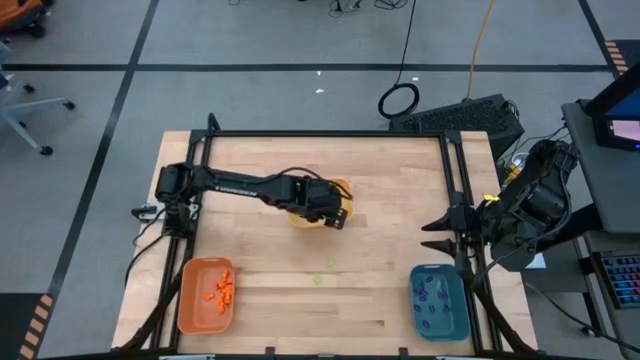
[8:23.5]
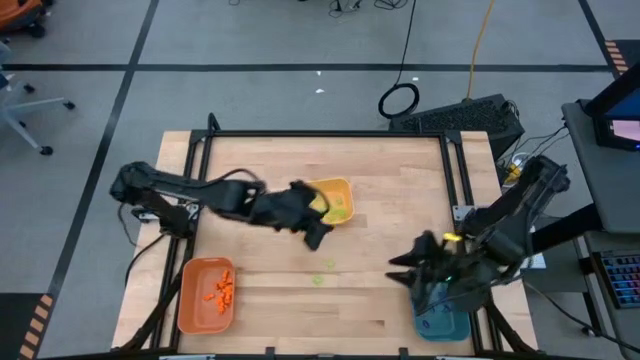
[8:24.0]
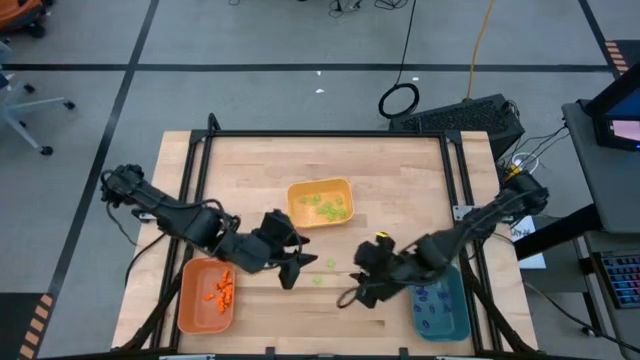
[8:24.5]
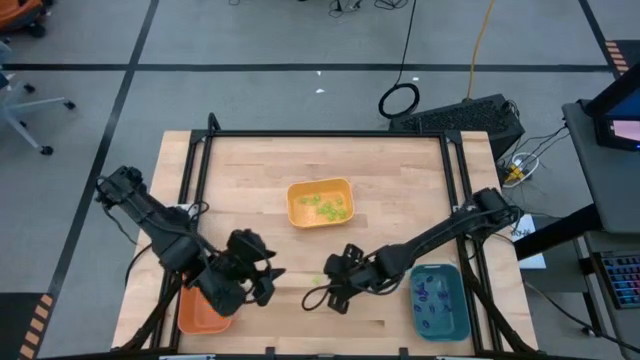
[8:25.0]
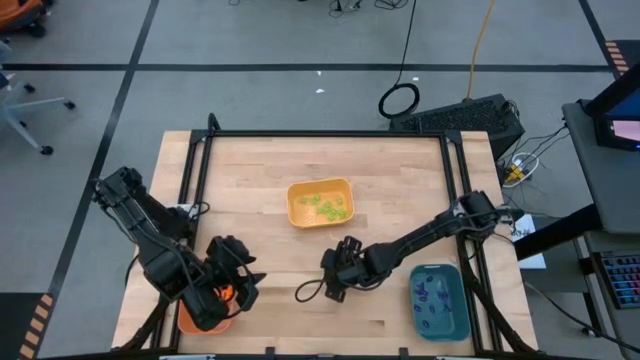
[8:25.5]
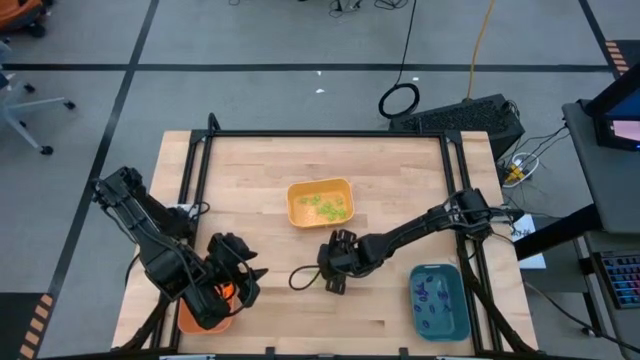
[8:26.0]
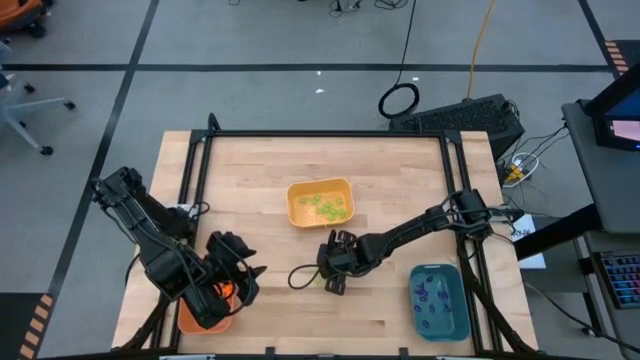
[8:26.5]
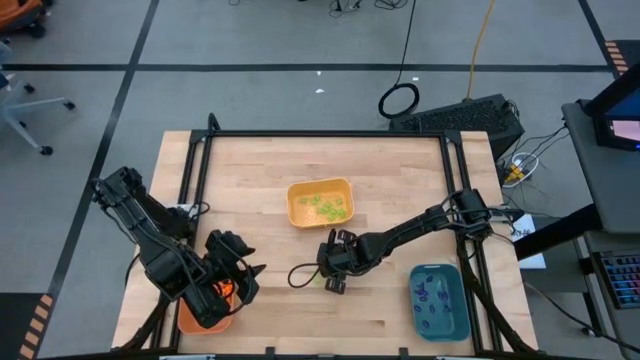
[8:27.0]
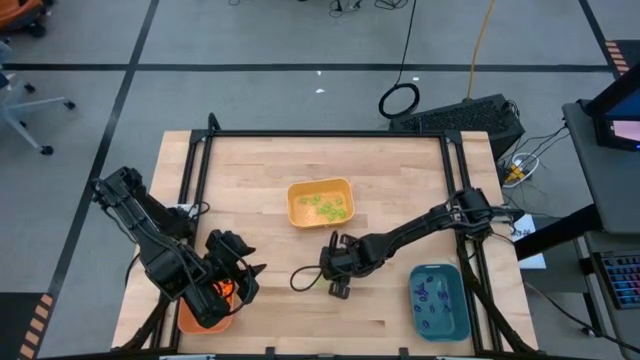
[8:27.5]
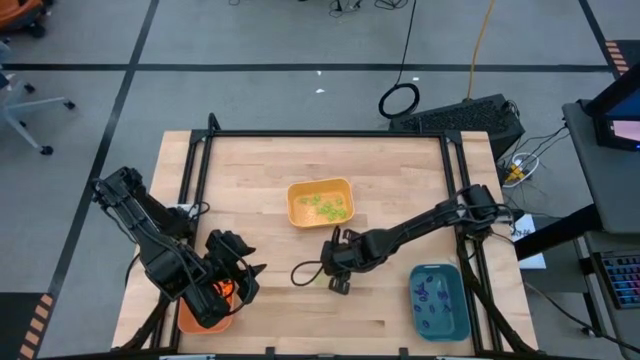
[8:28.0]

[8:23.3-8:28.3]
Task: Sort Halloween decoration
Put the green spider toy into the yellow bin

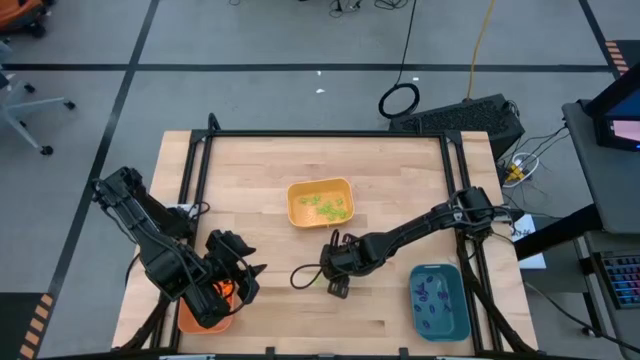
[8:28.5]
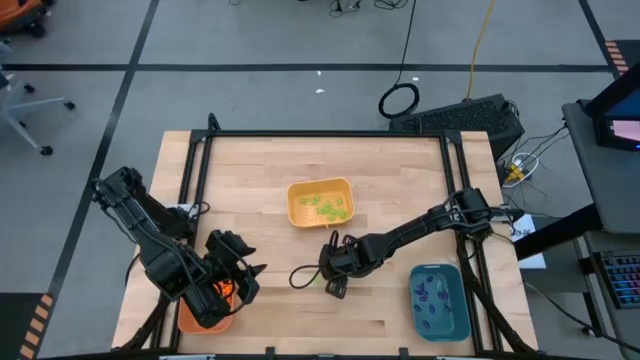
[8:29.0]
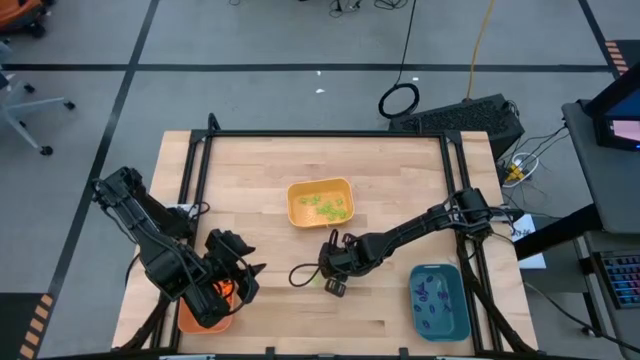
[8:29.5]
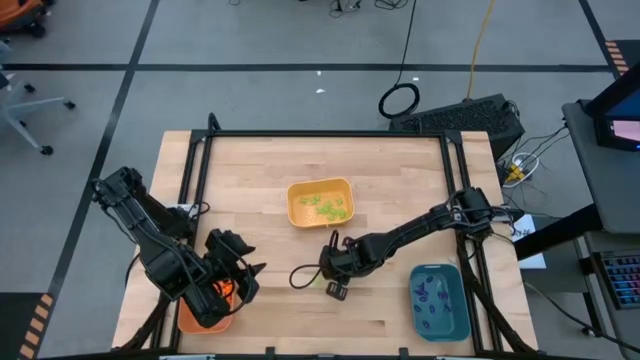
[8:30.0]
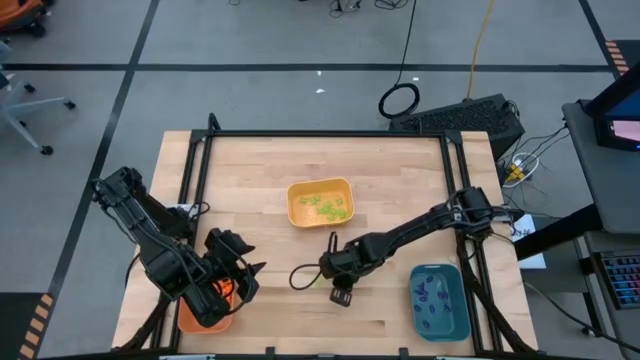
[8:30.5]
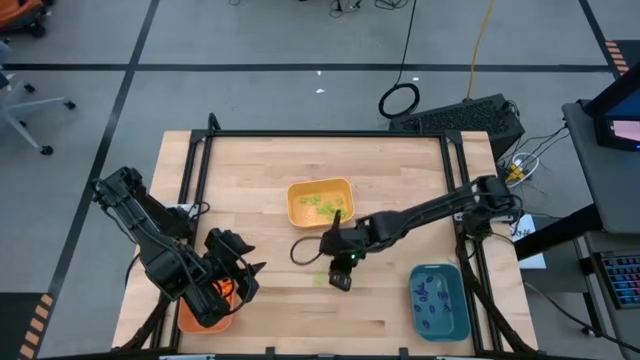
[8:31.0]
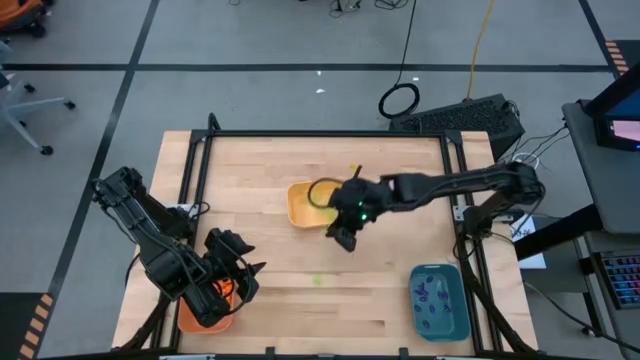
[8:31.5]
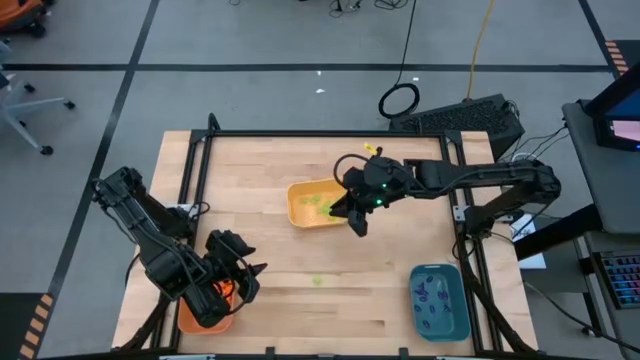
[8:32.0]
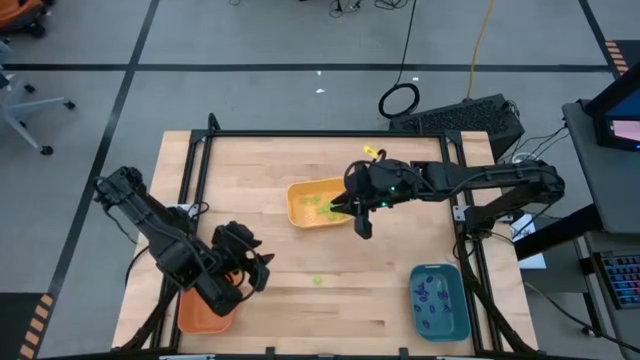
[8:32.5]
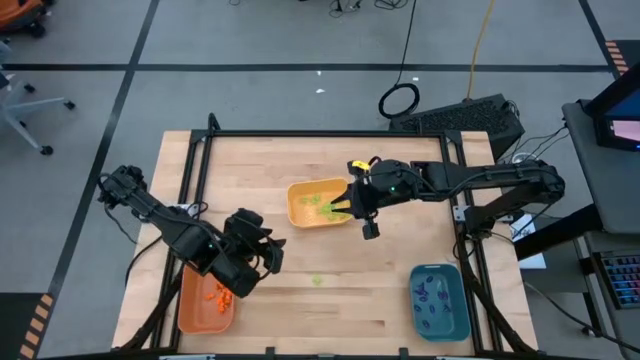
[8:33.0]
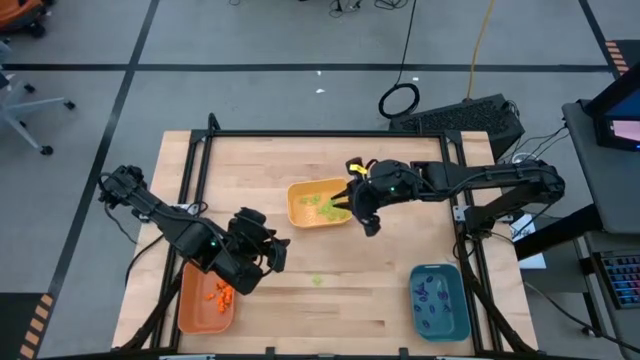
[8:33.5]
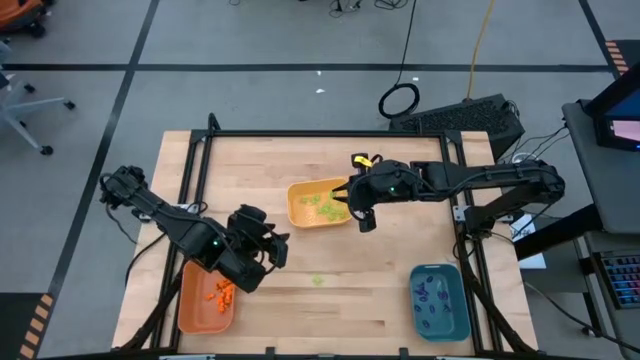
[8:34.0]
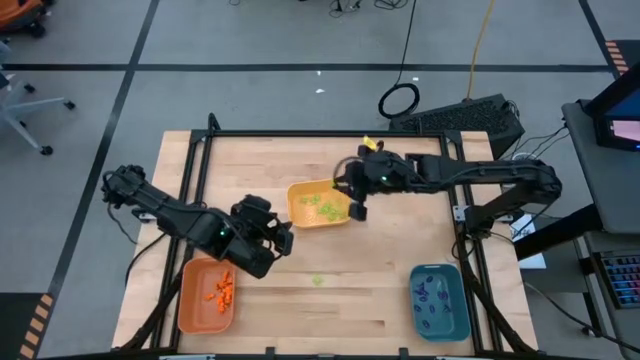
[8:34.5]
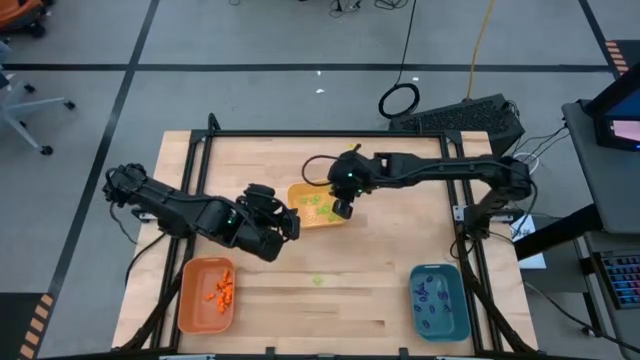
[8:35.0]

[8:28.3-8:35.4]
Put the green spider toy into the yellow bin

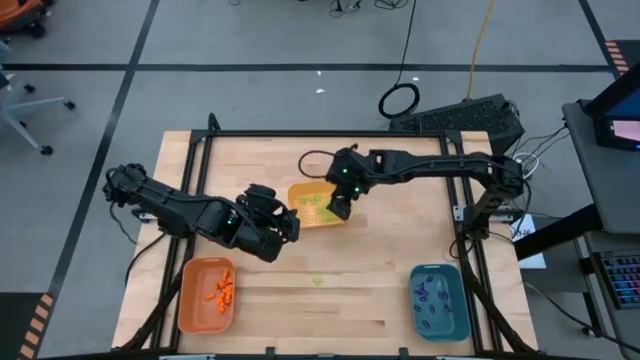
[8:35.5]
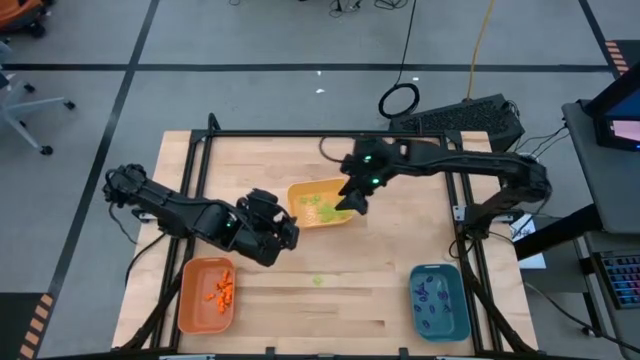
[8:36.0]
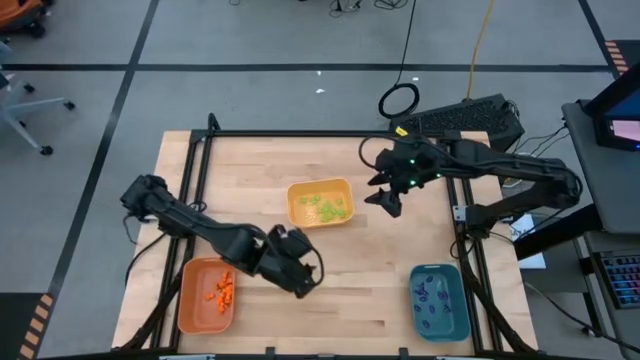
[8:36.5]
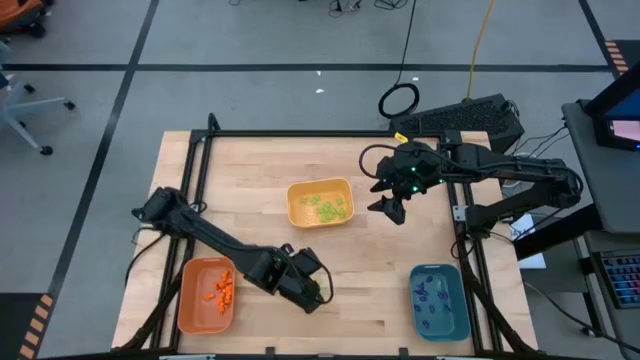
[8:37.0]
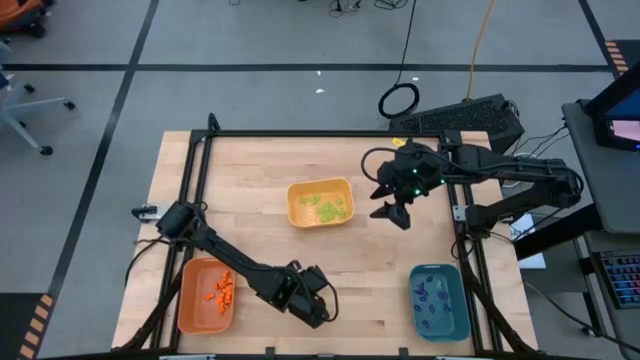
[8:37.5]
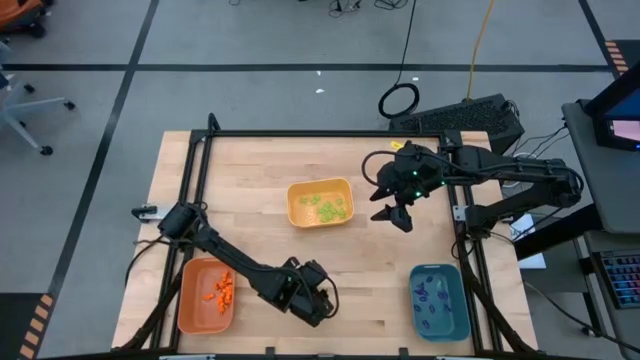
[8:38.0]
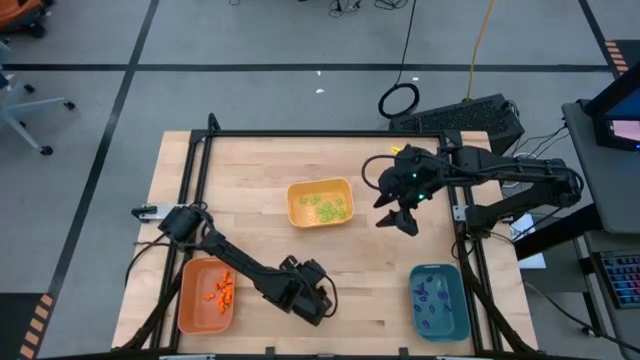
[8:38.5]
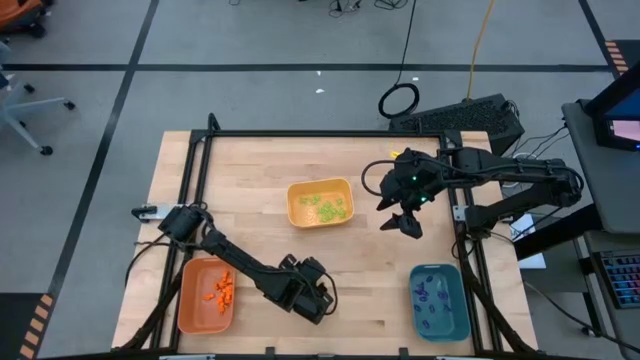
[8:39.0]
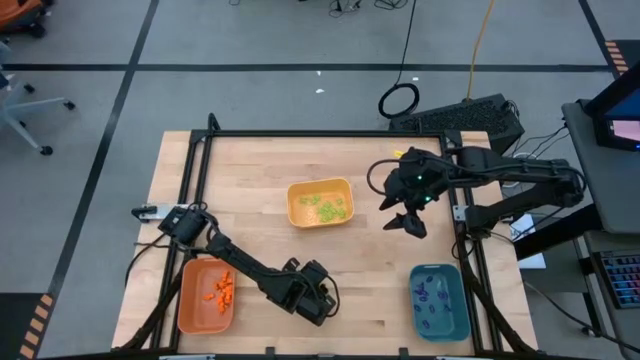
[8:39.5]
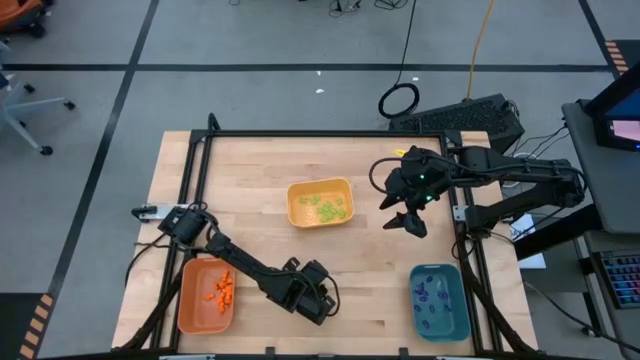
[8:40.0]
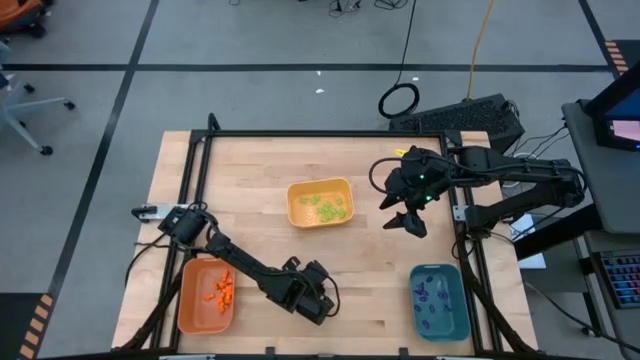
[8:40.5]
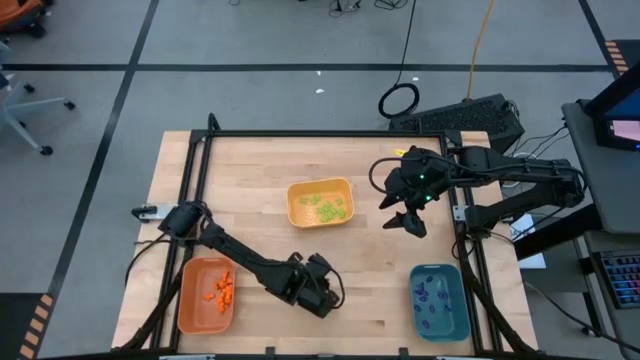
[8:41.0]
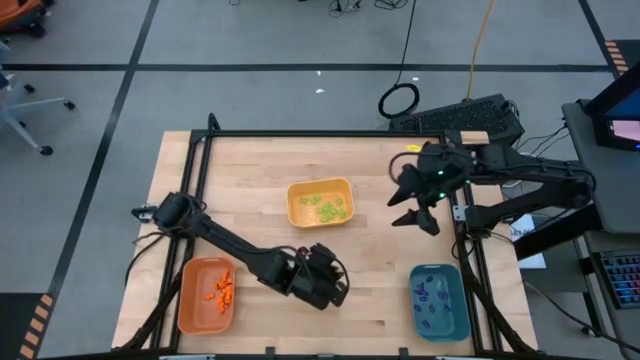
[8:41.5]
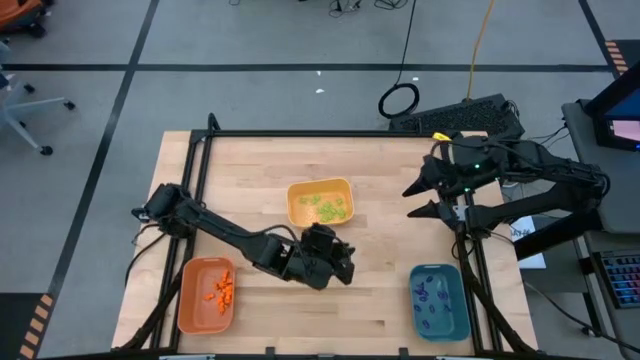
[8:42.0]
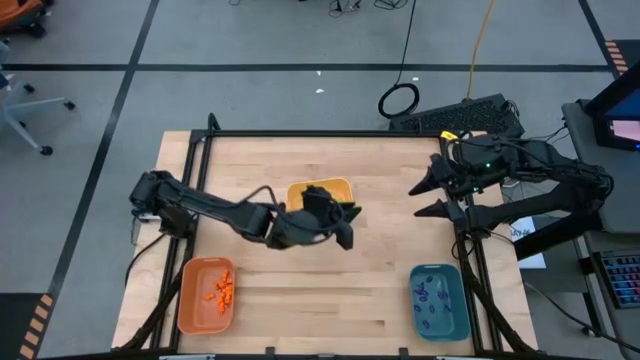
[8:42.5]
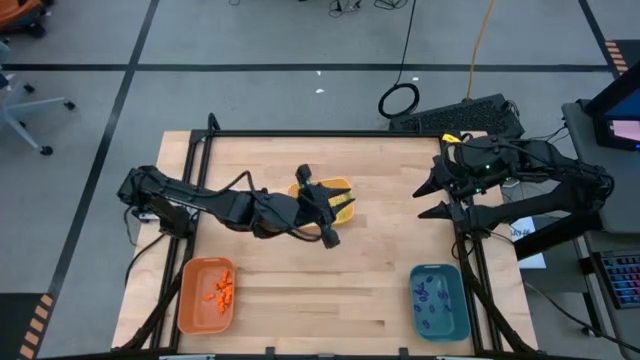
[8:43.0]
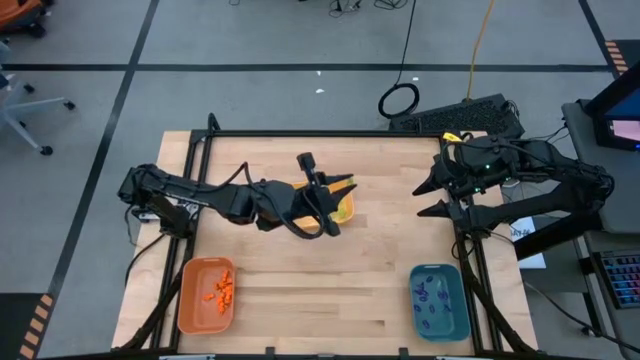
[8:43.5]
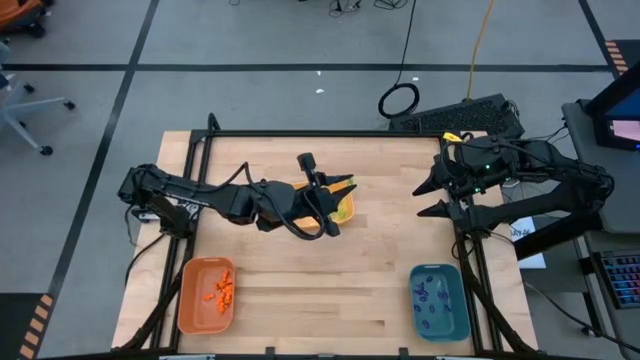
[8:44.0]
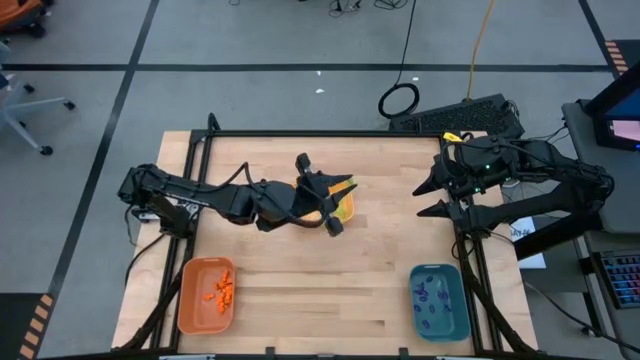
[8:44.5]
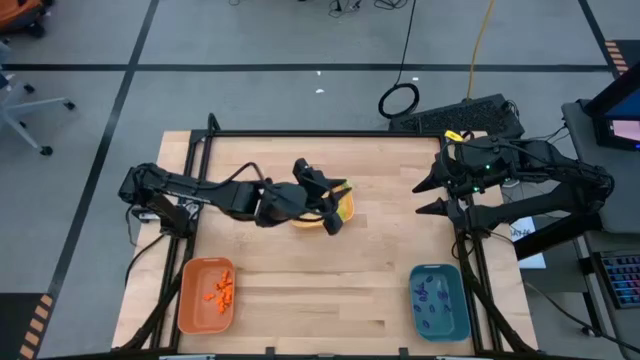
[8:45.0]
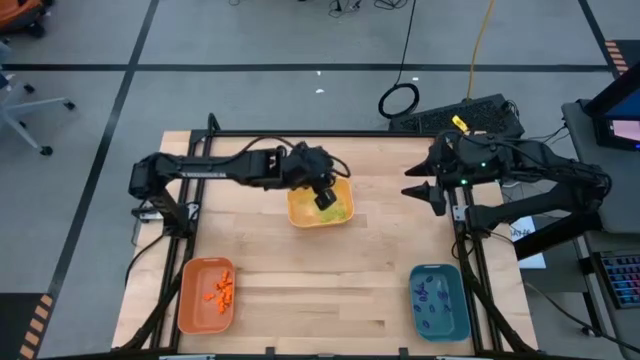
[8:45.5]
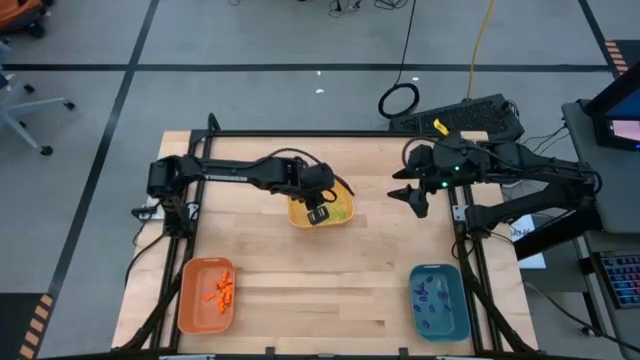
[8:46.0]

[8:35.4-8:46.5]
Put the green spider toy into the yellow bin
